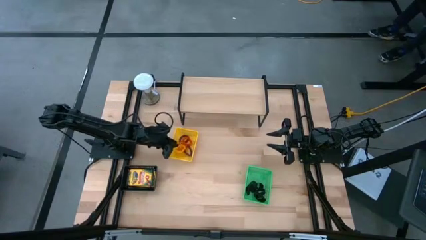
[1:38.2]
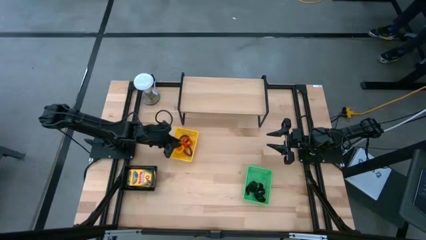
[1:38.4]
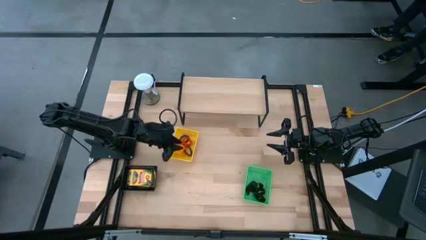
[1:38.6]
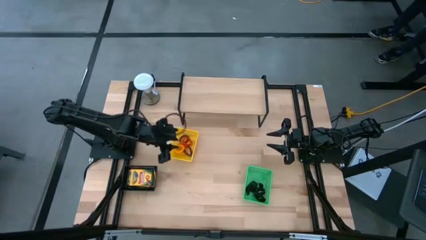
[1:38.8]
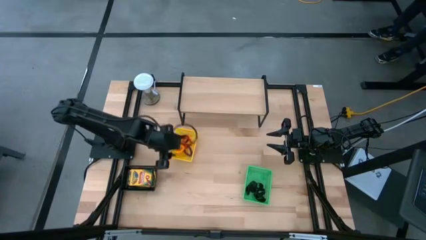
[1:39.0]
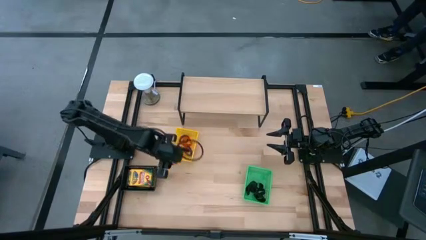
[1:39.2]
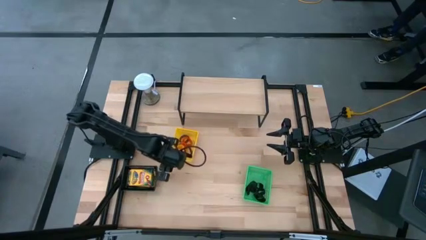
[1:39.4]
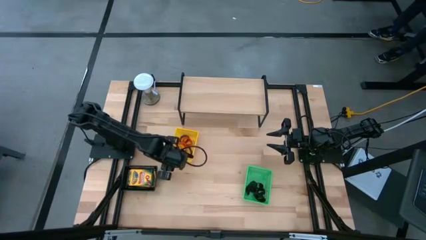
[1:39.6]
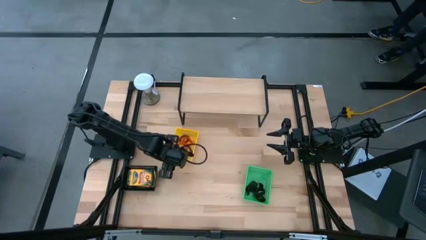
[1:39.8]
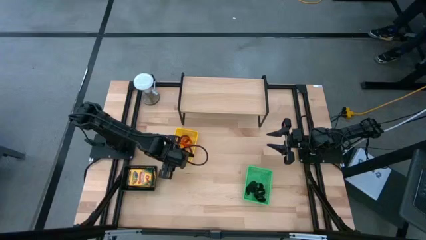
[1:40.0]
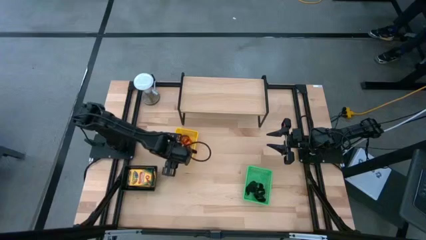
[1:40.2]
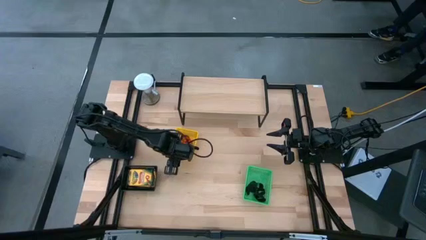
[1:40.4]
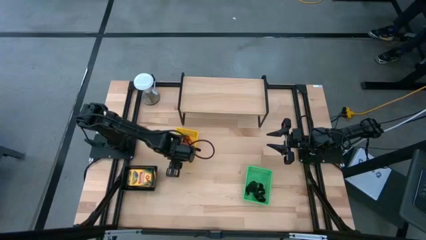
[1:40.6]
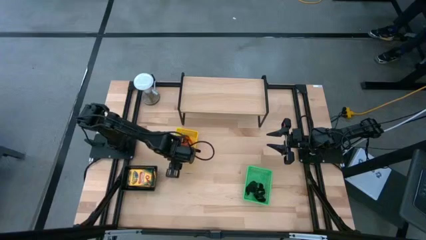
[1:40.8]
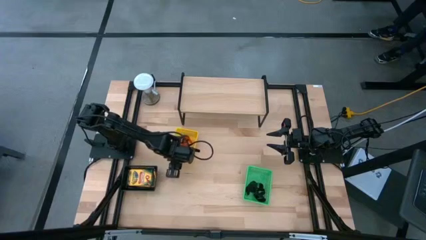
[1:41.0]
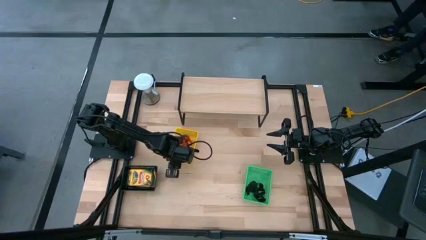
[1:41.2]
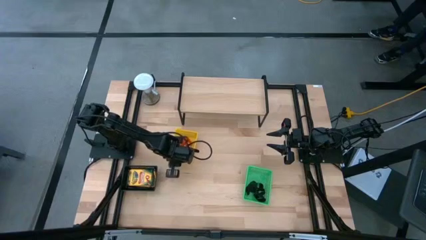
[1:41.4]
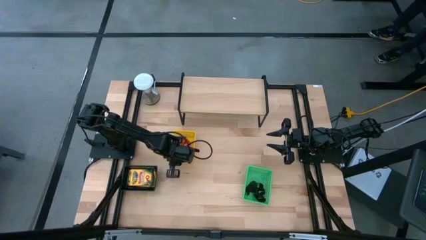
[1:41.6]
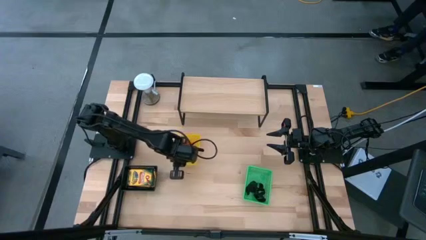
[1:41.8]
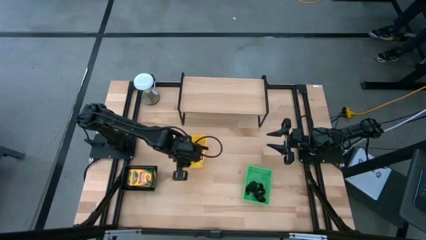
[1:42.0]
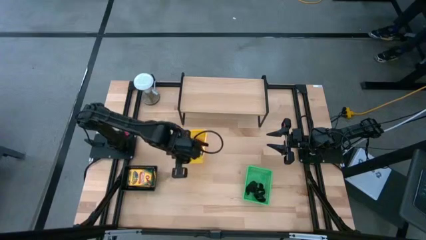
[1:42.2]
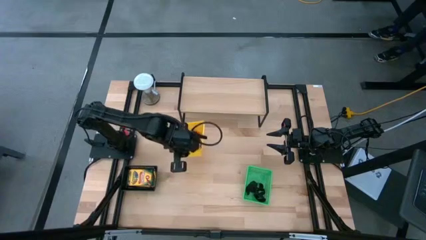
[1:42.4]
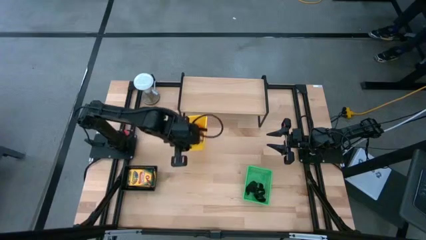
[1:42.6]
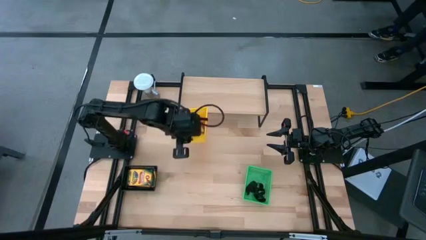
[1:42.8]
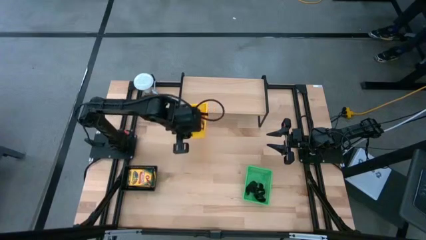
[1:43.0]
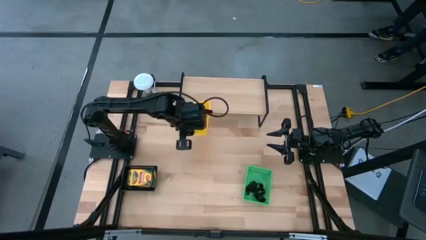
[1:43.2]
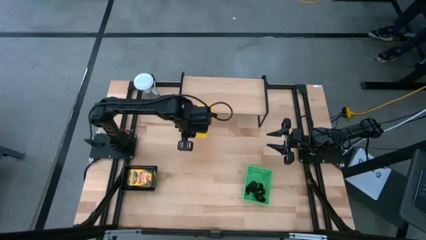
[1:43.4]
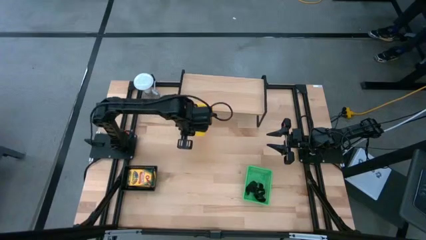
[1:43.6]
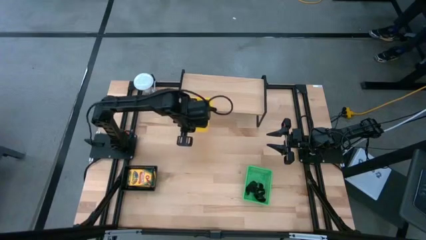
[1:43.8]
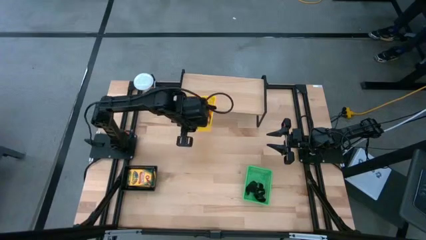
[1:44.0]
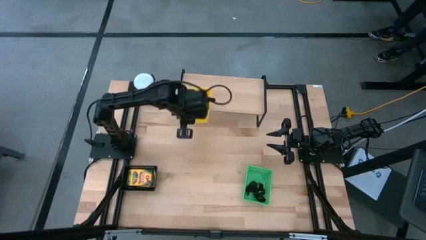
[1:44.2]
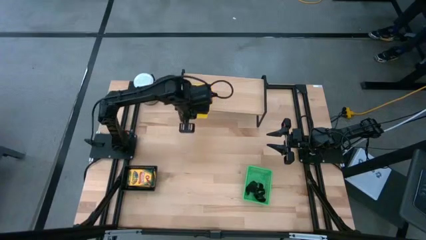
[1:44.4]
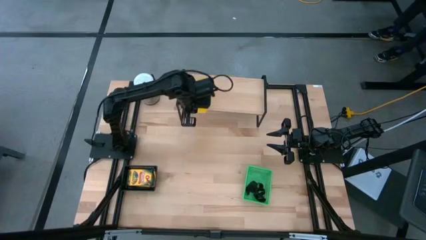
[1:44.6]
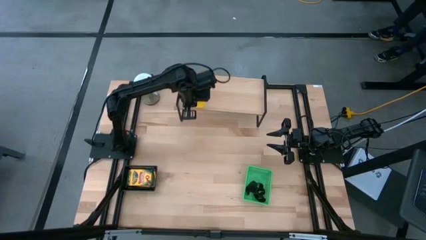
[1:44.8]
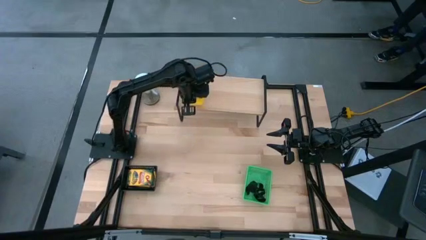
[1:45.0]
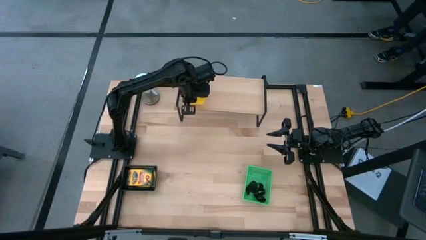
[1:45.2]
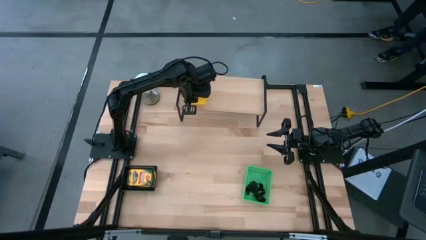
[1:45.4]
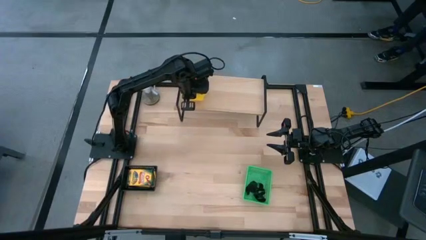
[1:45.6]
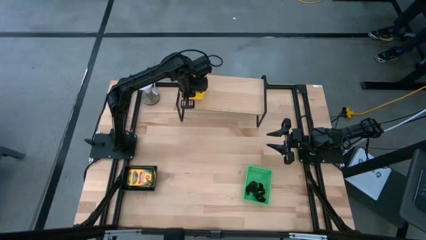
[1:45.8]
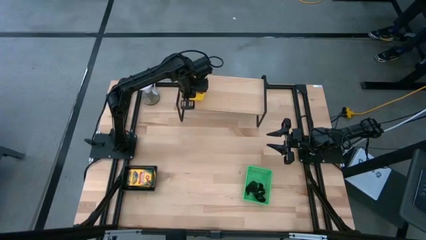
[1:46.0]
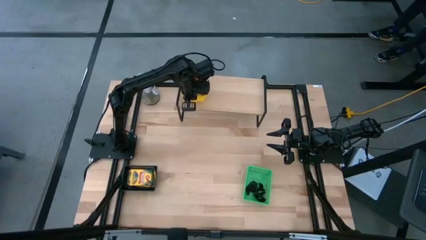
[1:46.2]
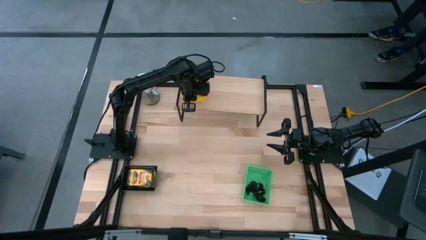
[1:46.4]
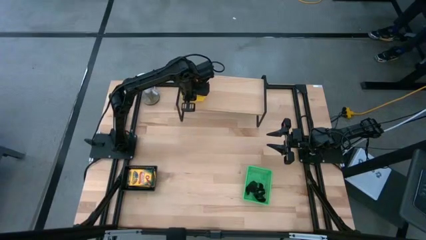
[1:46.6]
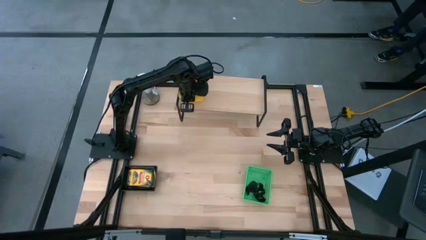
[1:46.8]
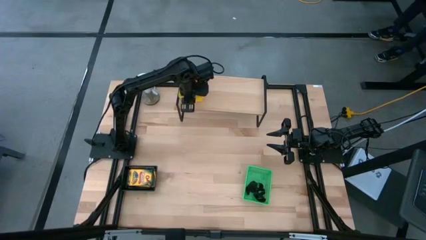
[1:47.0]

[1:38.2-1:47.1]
Task: Pick & Place Office Desk Supplies
Put the yellow bin with spring keychains on the shelf

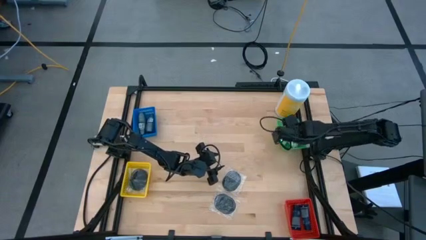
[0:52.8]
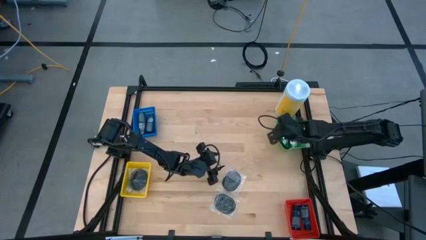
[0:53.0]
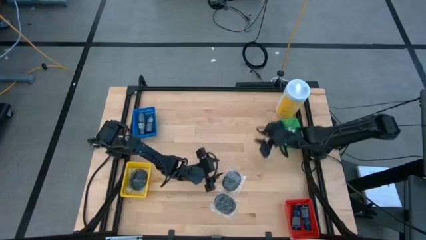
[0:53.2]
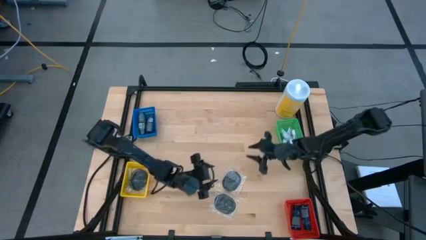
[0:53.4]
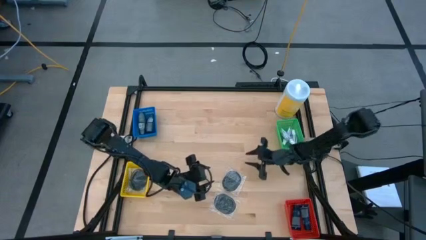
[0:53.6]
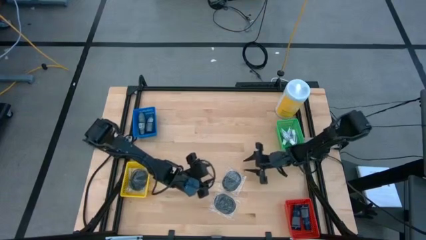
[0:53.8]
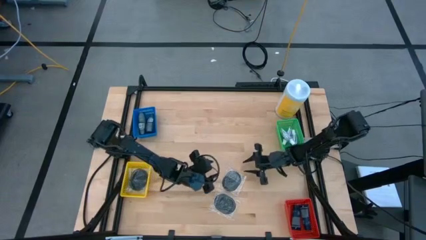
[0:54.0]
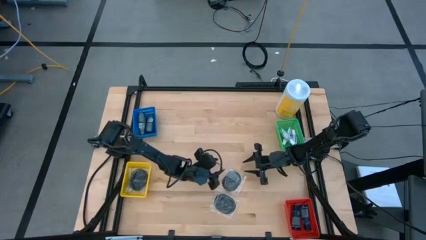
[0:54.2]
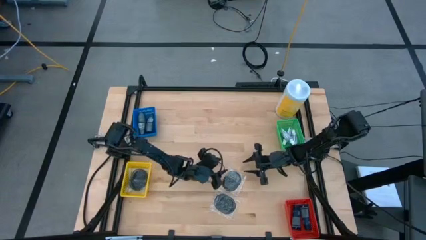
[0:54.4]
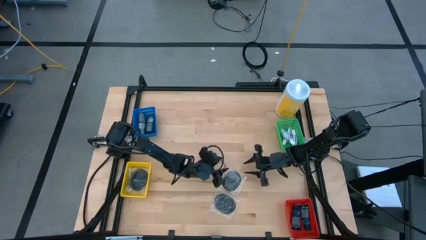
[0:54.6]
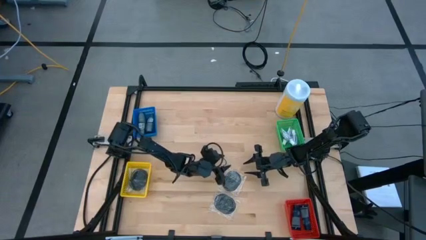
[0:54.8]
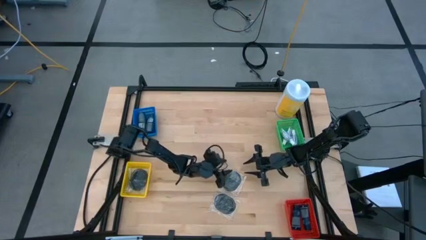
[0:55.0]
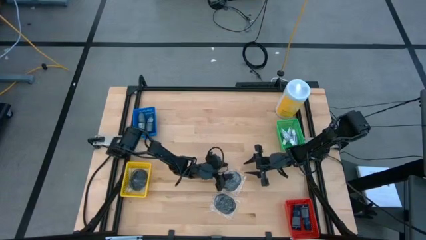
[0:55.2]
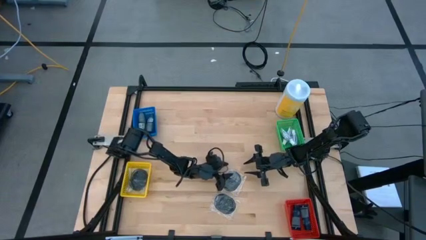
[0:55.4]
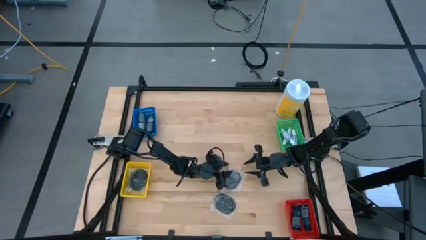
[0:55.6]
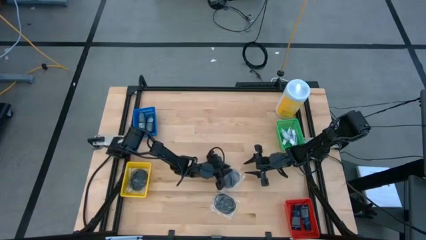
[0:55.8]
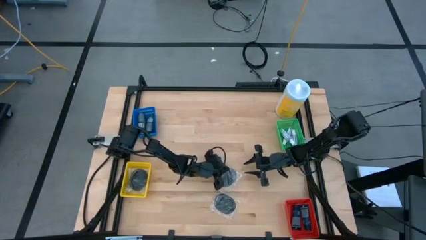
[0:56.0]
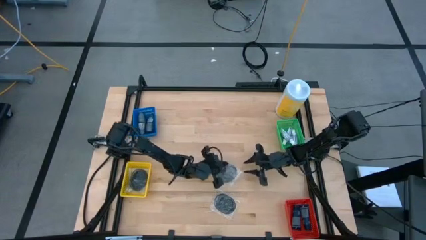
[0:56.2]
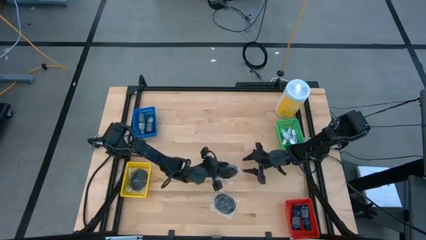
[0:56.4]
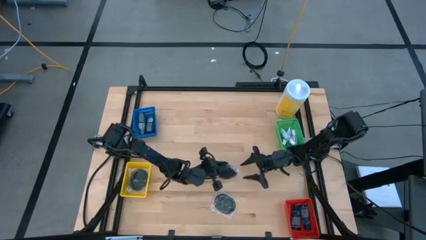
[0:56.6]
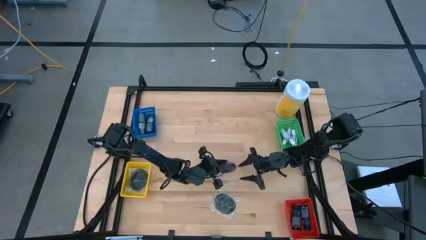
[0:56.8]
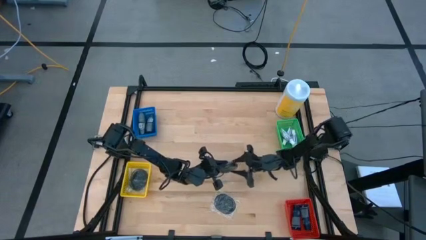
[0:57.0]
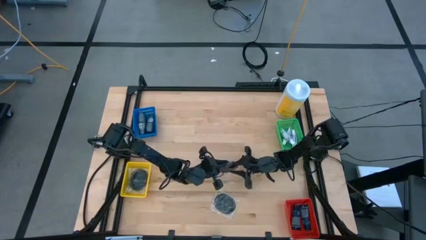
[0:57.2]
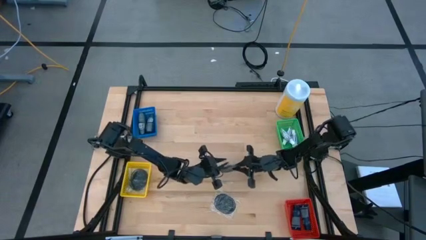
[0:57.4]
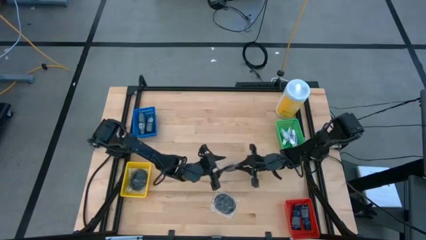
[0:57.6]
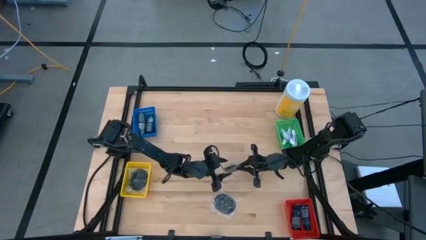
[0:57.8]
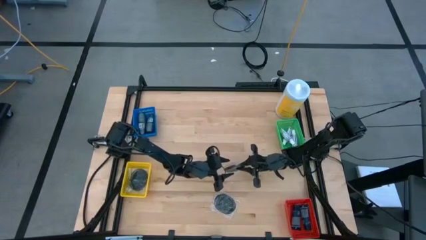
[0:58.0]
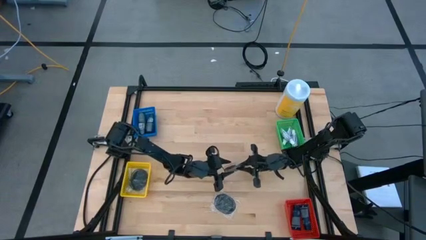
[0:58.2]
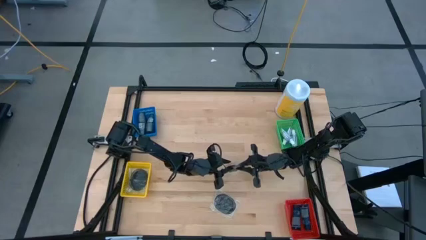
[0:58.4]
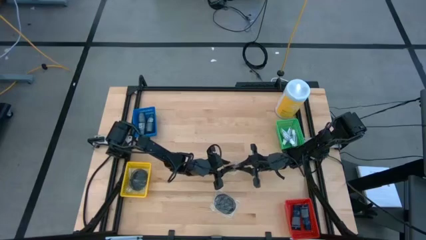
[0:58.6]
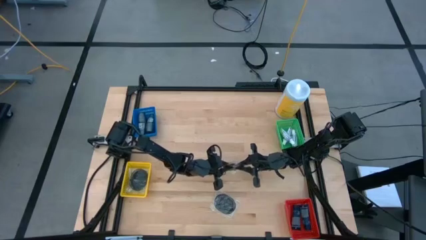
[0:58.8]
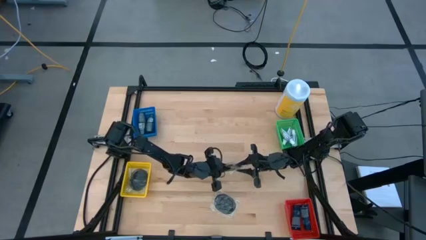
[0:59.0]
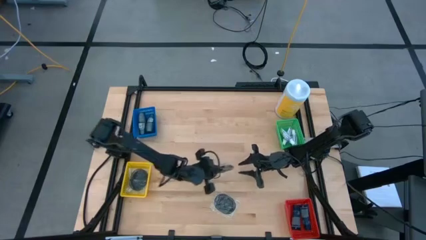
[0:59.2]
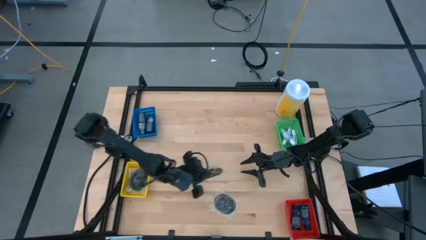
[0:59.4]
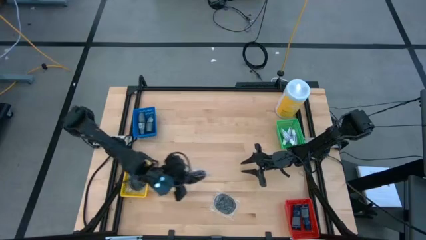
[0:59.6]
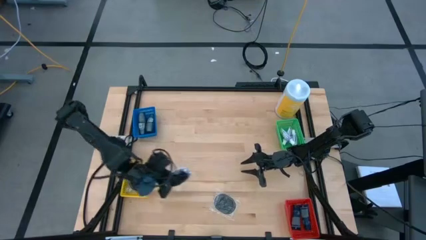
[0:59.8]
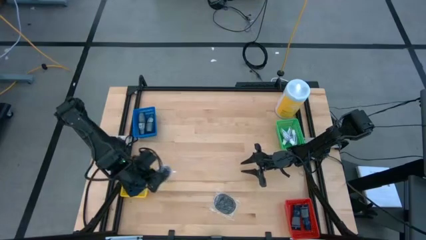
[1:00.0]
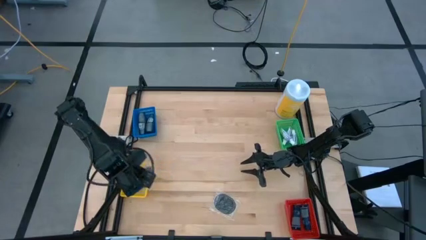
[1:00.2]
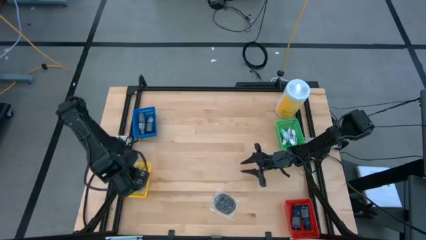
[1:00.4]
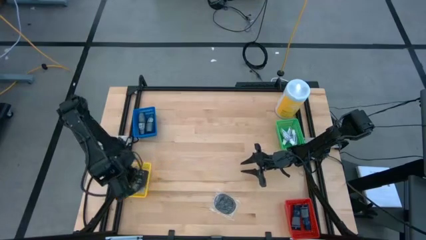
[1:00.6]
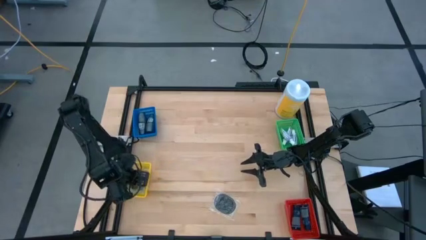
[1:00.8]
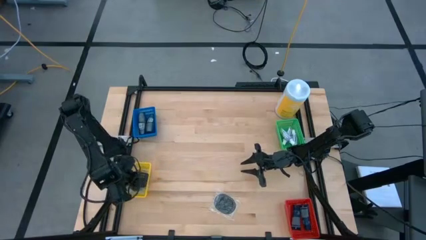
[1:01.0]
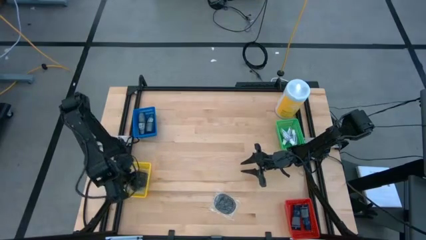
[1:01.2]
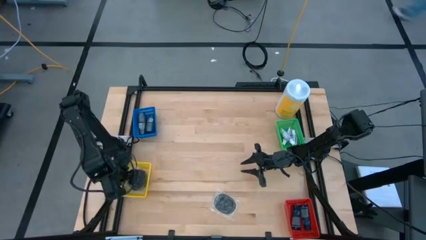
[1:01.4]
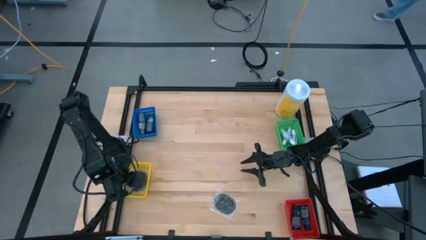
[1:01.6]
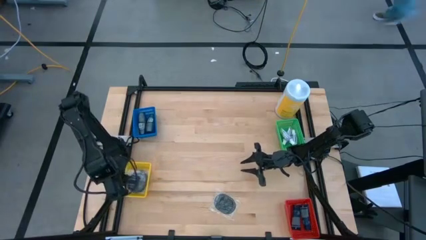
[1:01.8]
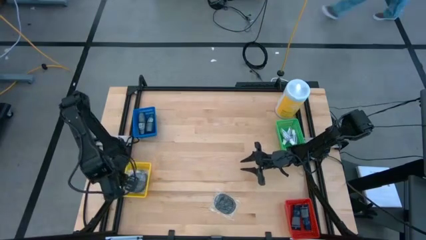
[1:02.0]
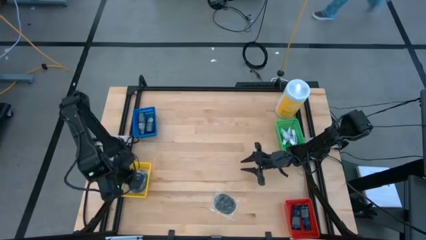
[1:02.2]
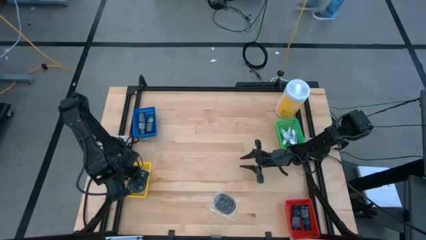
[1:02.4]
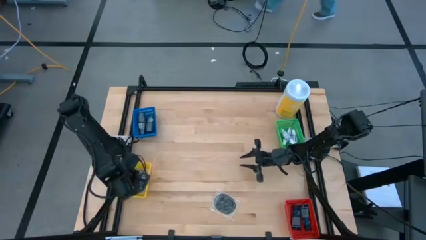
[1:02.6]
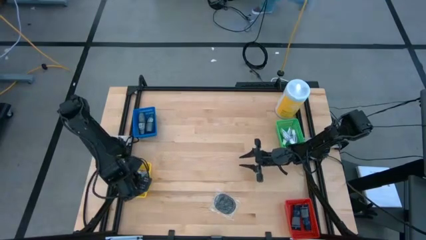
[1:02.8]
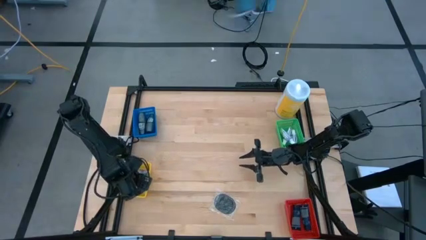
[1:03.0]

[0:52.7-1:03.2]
Task: Pick & Place Travel size toiletries
Put the black hairbrush into the yellow bin
